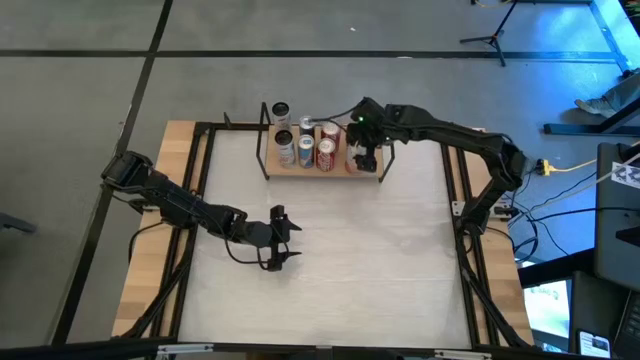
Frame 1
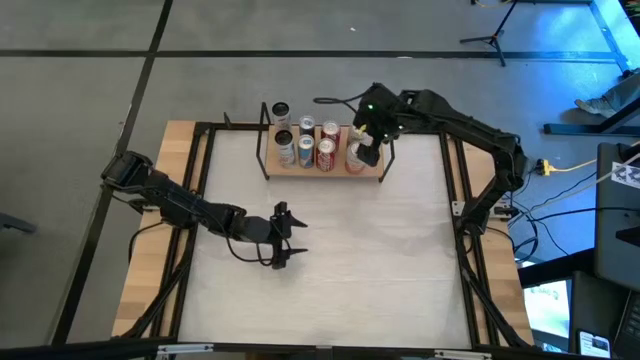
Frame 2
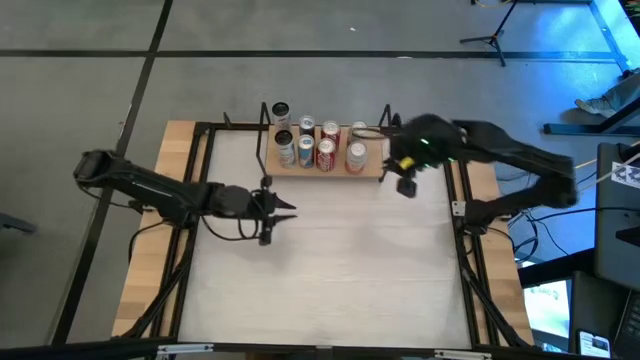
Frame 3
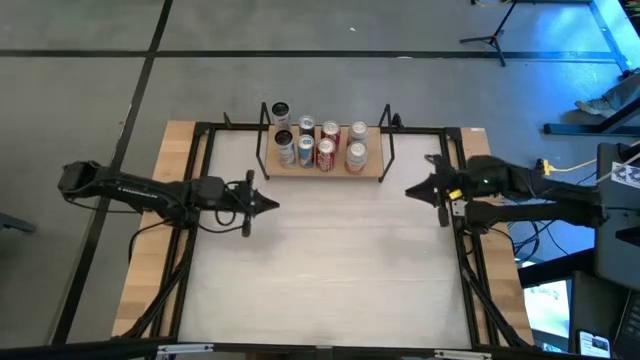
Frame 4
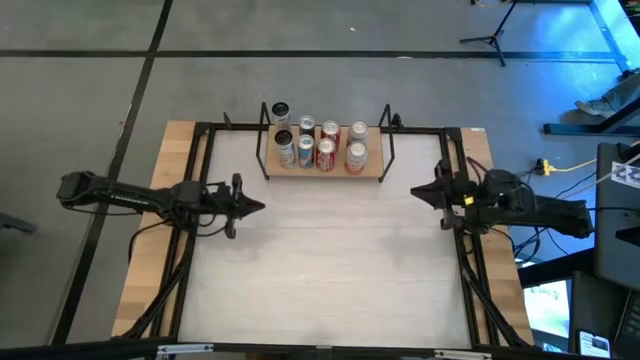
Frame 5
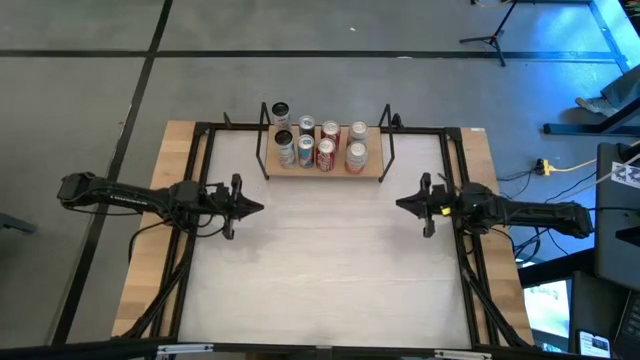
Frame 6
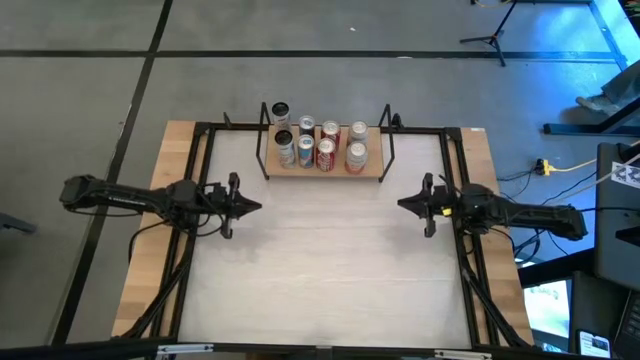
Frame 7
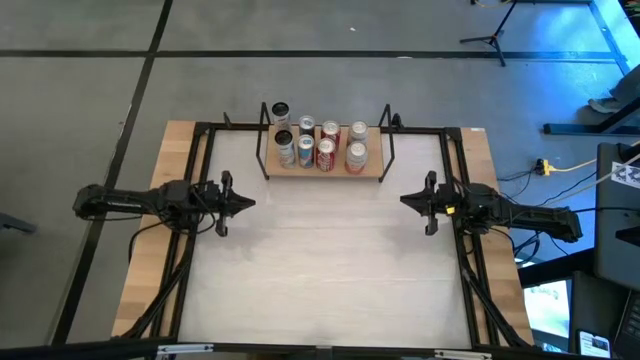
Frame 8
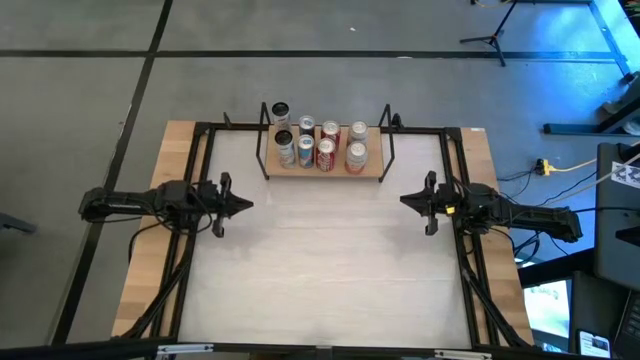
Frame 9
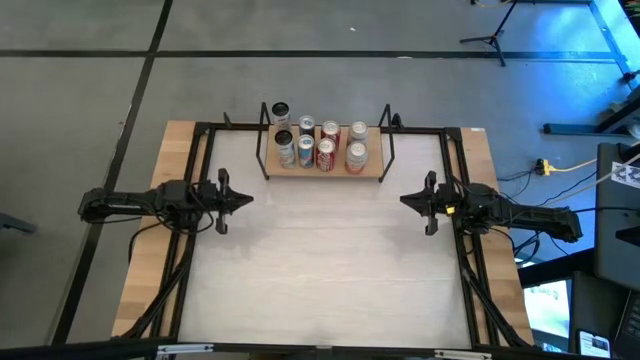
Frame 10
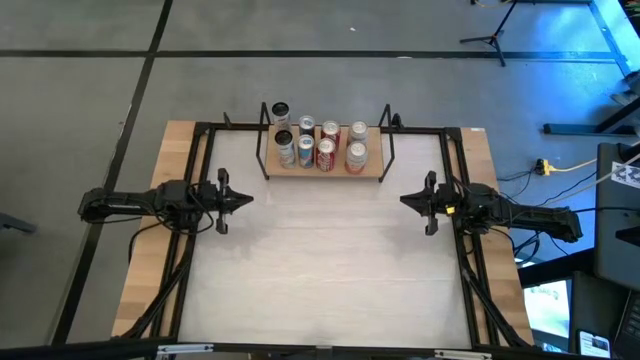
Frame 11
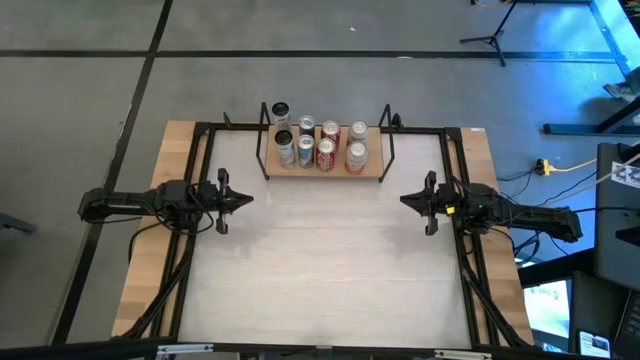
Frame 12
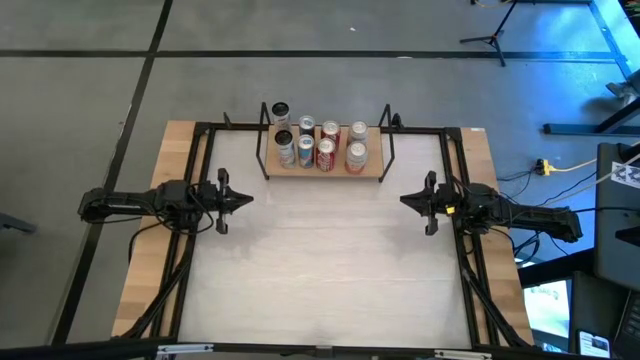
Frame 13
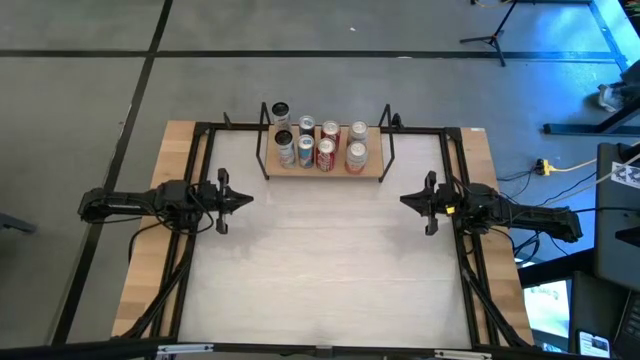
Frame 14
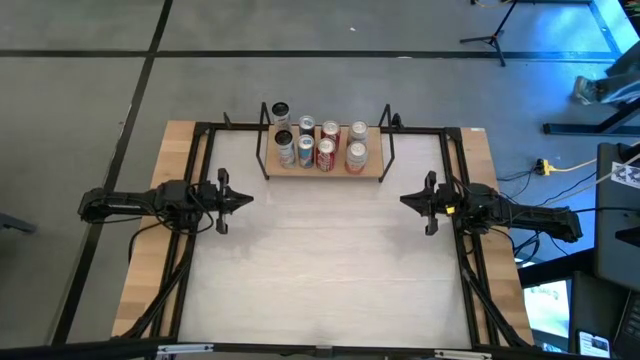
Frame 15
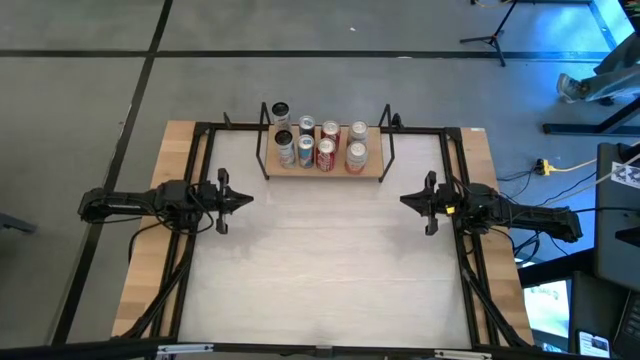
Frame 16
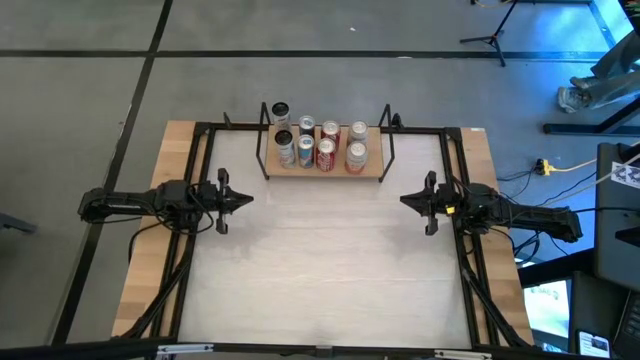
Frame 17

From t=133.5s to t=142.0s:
Task: Place canned beverage on shelf
Return to Home Position

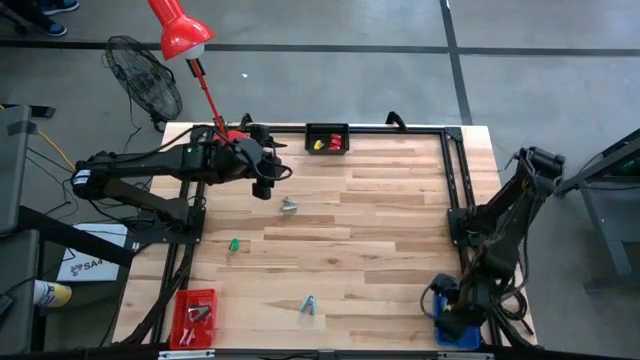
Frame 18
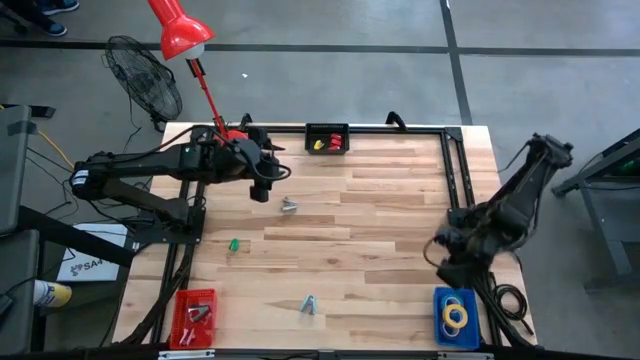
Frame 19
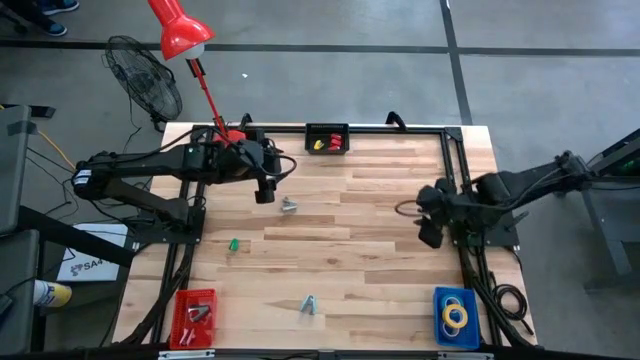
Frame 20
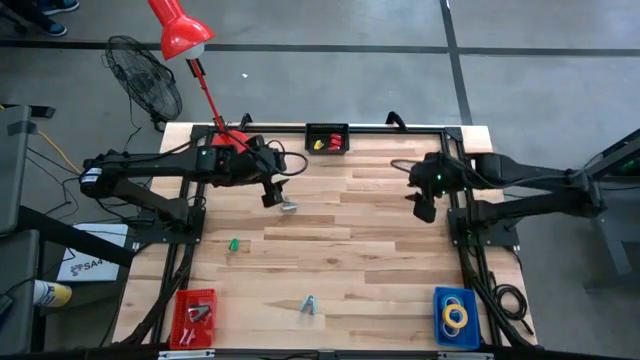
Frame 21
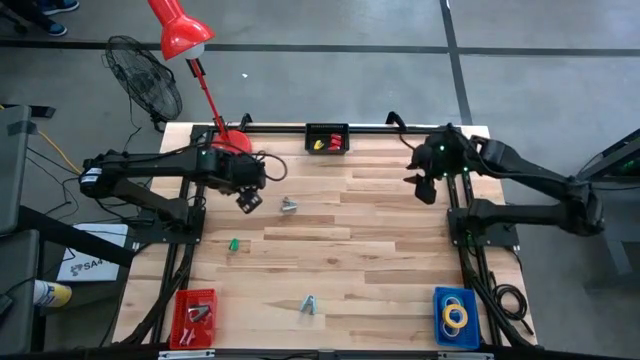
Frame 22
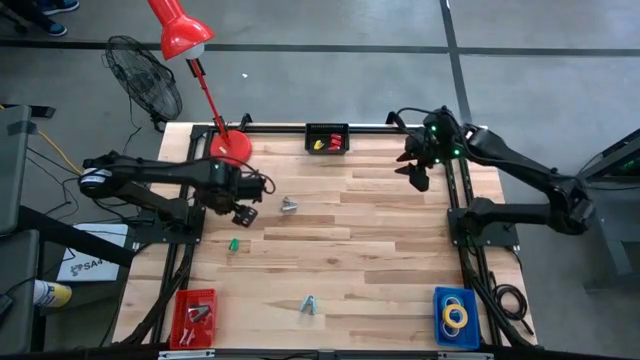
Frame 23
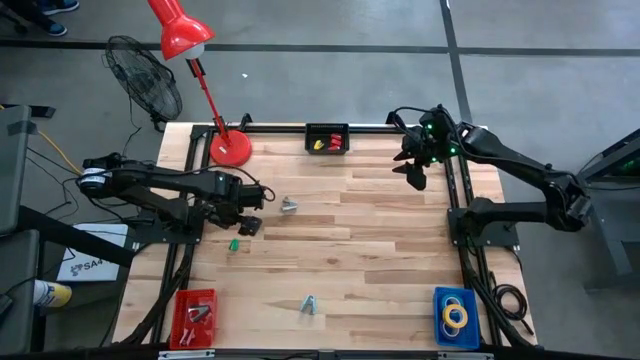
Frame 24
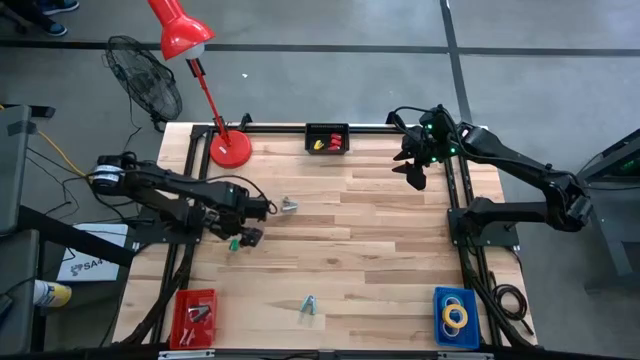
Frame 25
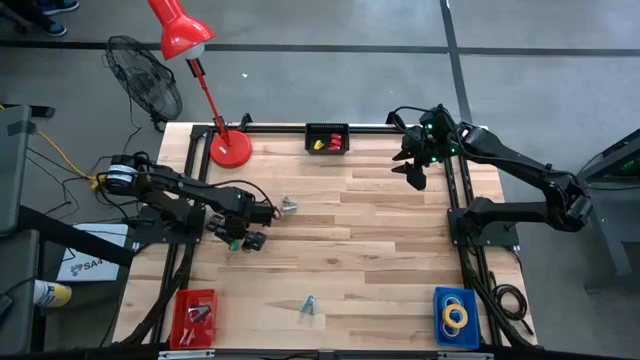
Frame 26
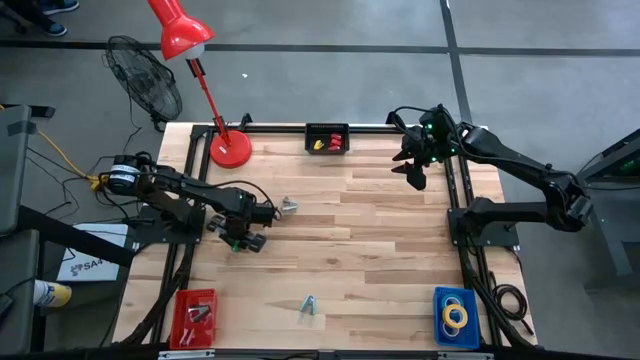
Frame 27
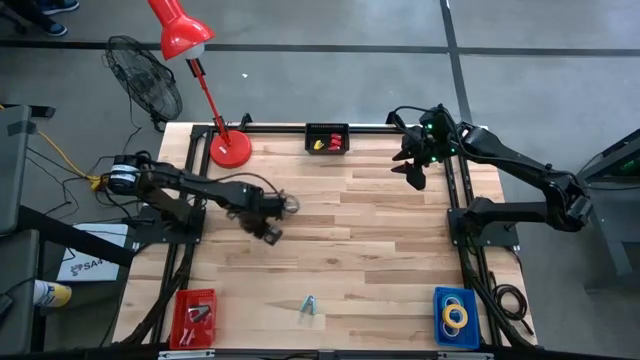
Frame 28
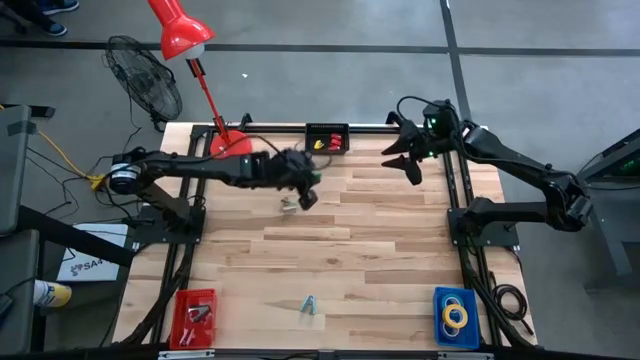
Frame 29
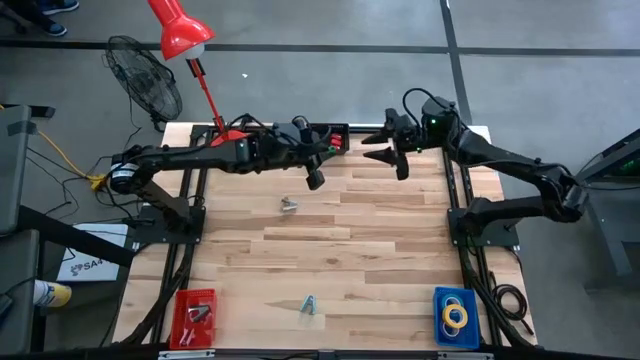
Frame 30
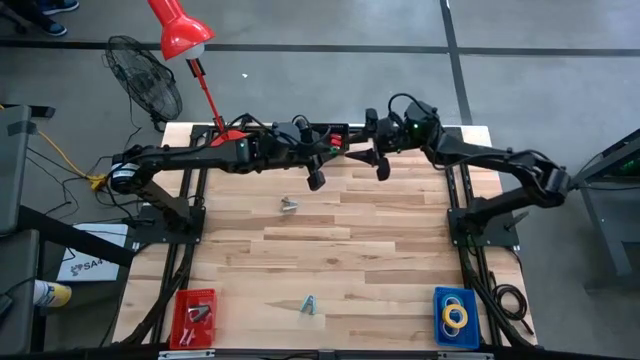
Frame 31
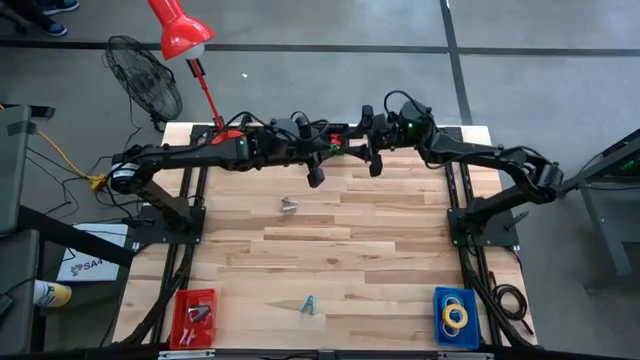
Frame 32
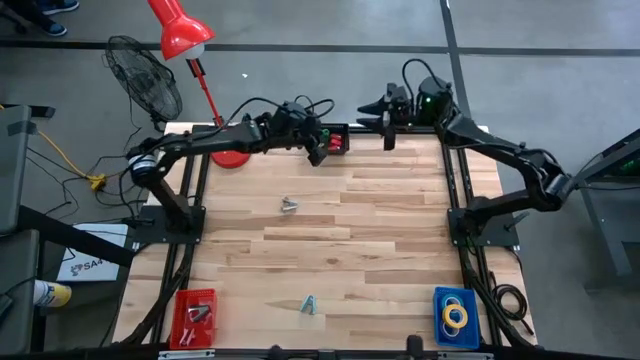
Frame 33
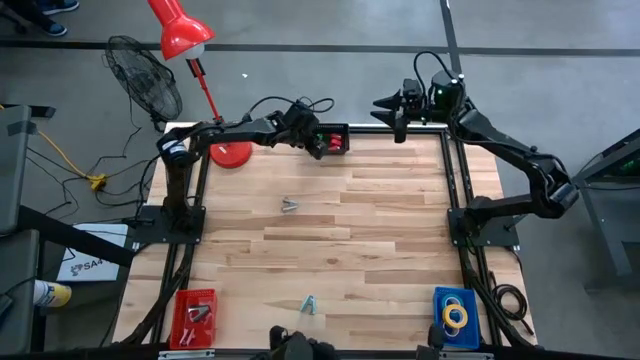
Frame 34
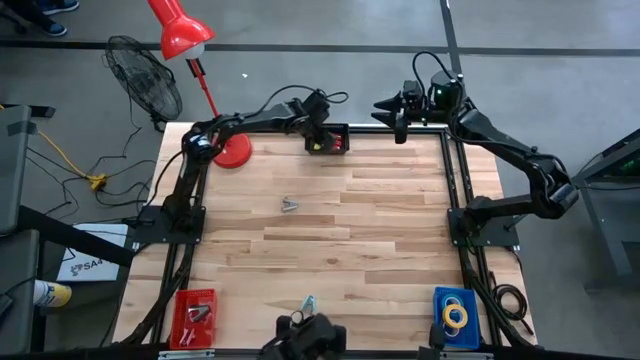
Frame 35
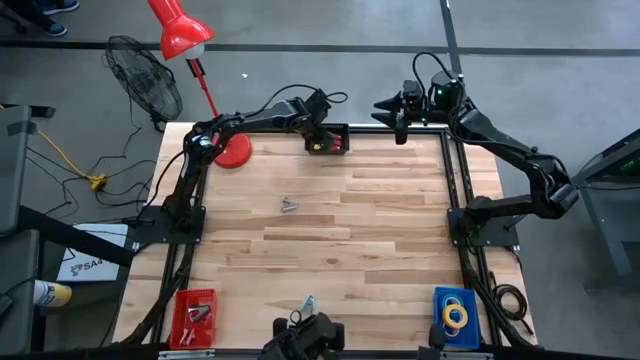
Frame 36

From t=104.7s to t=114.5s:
Task: Pick and place Stapler, Stapler remover, tape
Put the green stapler into the black basket
